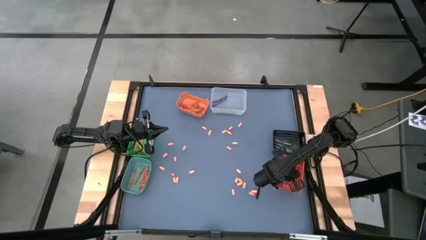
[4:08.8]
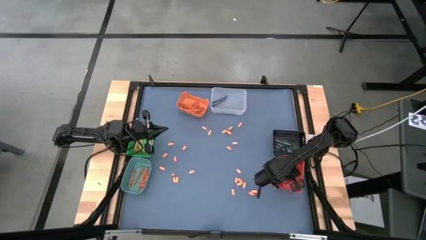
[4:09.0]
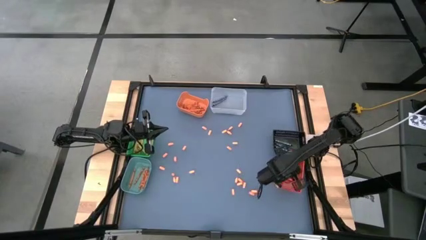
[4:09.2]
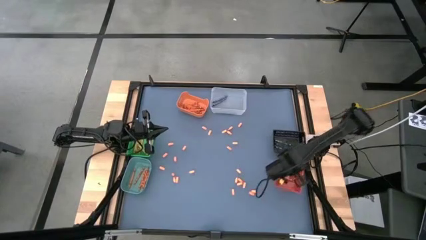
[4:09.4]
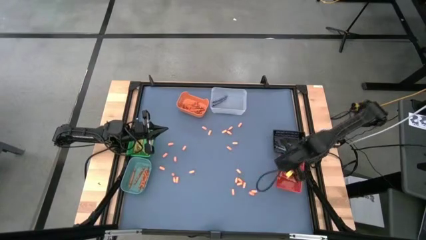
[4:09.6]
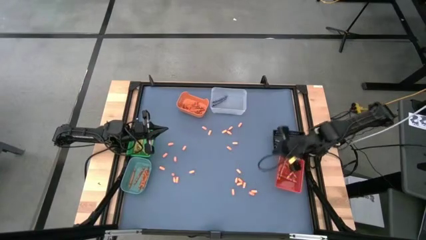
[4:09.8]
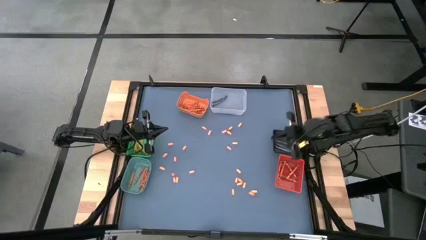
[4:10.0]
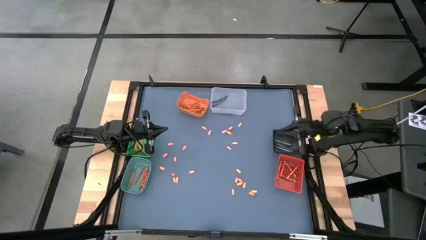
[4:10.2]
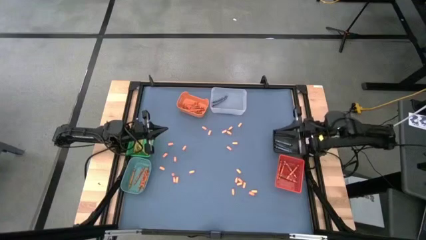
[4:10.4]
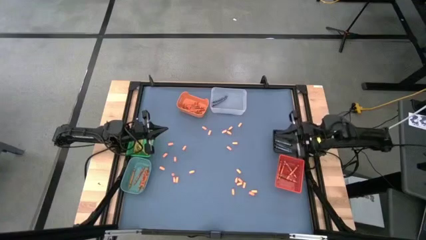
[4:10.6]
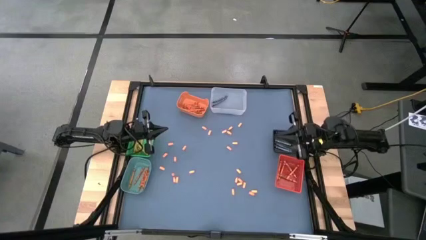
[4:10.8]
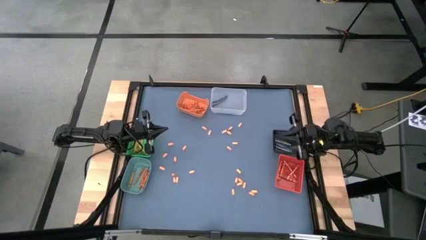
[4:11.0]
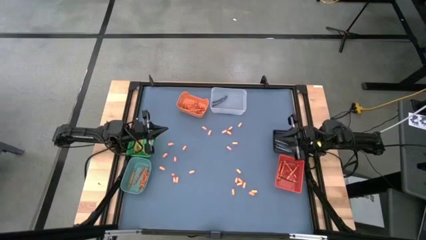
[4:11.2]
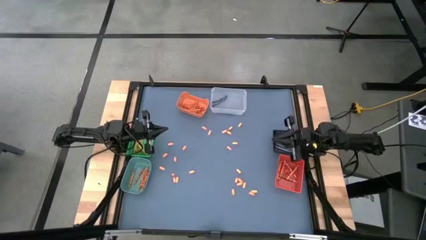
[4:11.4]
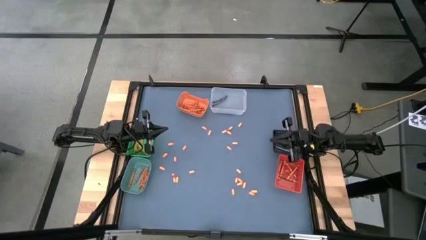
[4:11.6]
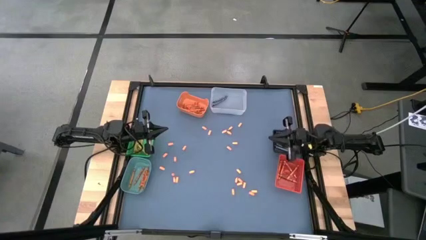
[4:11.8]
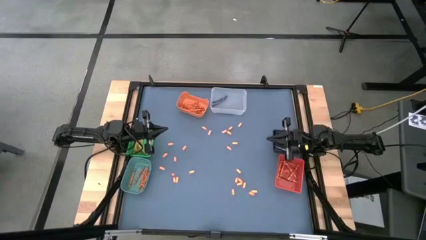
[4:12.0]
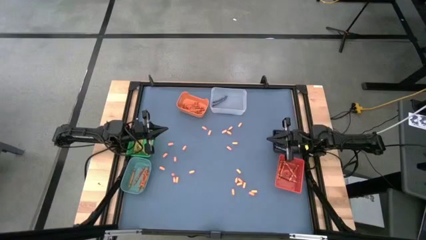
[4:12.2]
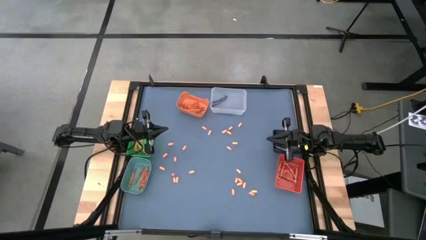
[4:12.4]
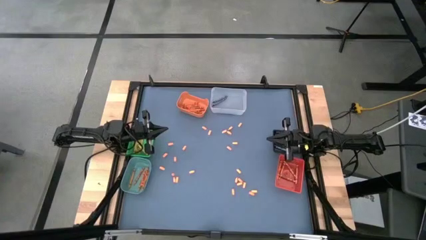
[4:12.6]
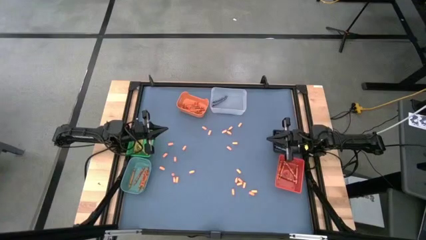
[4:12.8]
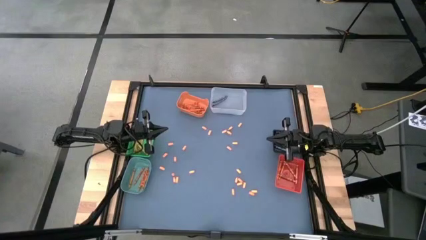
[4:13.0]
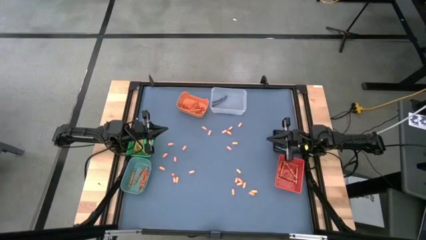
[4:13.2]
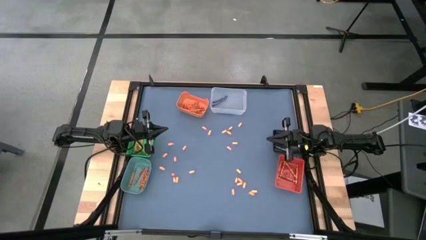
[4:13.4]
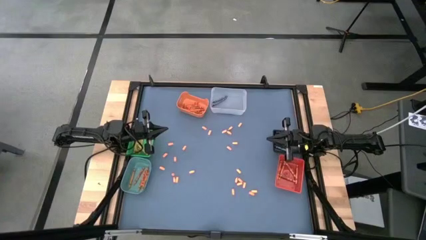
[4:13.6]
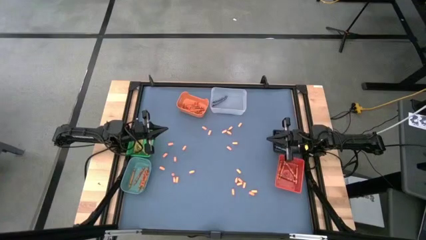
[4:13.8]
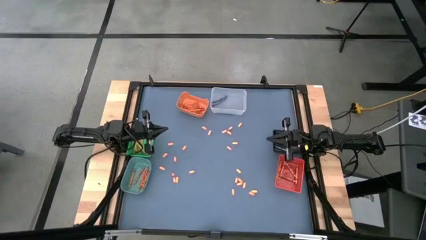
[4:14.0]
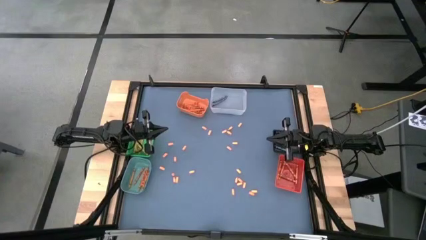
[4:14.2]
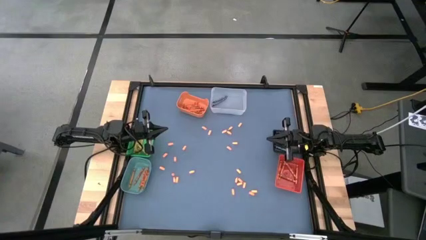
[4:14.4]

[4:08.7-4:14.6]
Task: Sort crayons
Return to home position

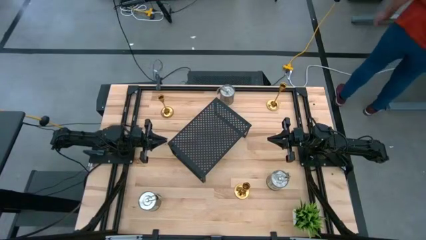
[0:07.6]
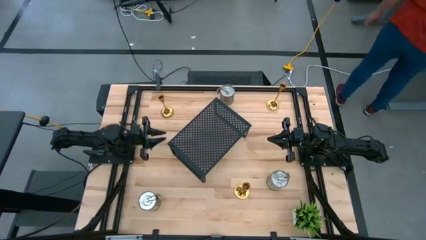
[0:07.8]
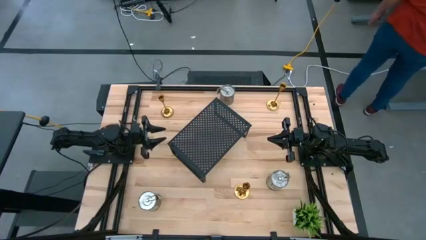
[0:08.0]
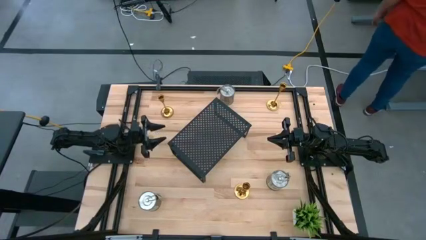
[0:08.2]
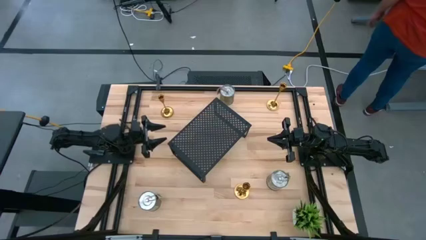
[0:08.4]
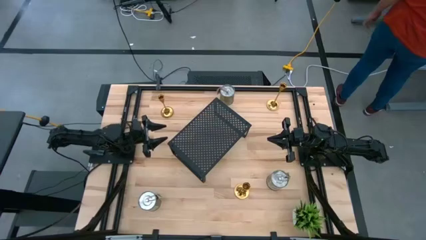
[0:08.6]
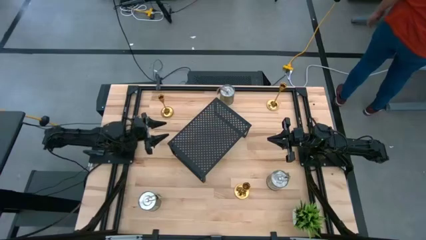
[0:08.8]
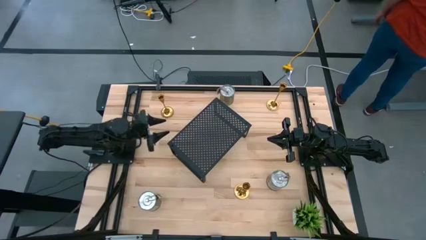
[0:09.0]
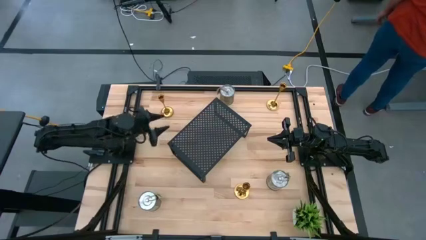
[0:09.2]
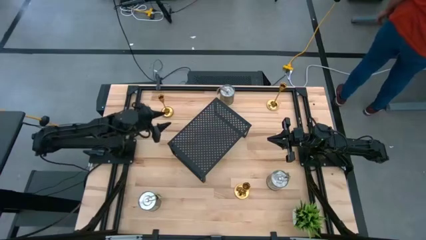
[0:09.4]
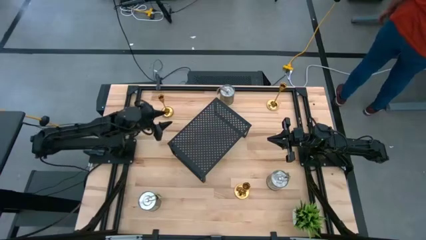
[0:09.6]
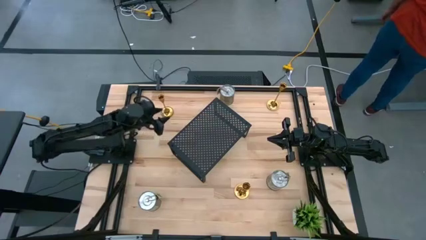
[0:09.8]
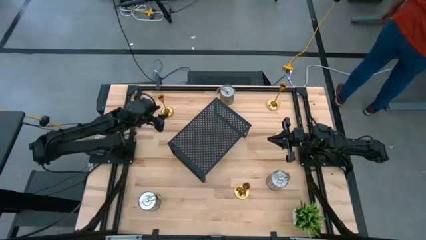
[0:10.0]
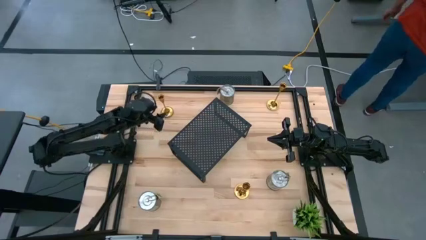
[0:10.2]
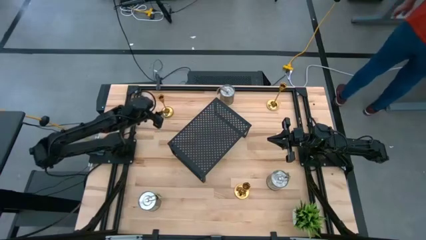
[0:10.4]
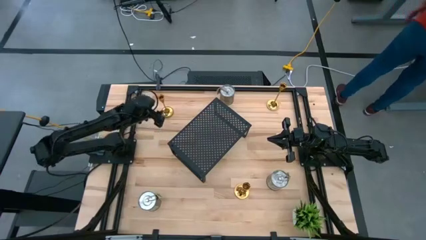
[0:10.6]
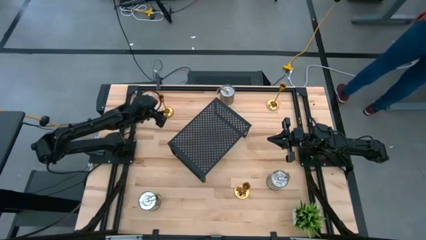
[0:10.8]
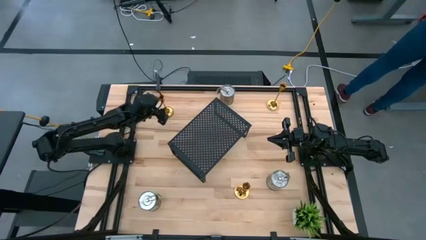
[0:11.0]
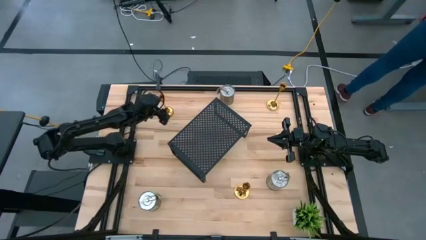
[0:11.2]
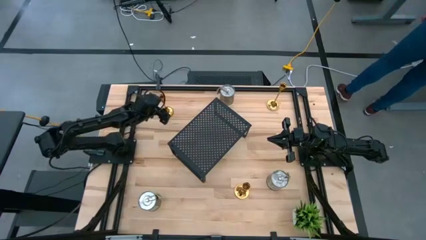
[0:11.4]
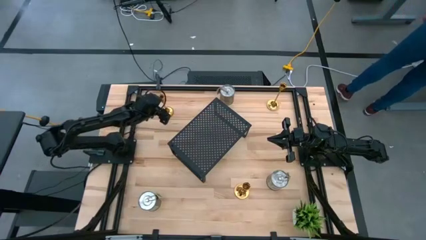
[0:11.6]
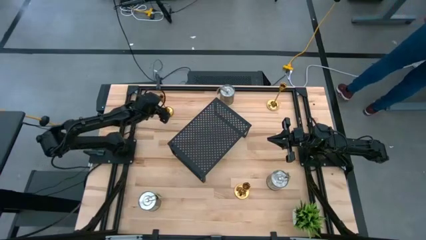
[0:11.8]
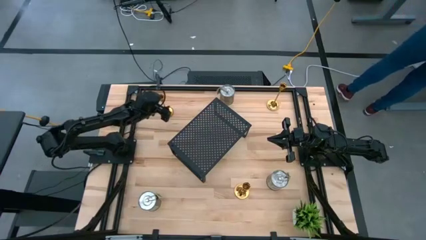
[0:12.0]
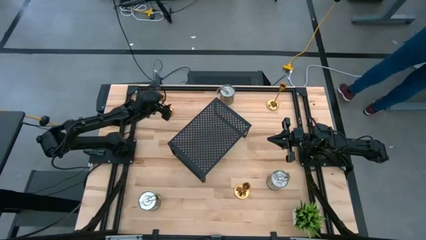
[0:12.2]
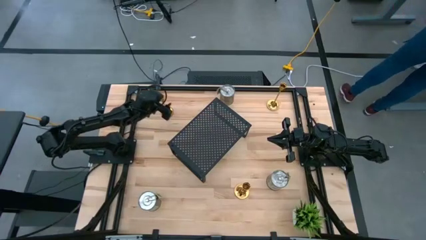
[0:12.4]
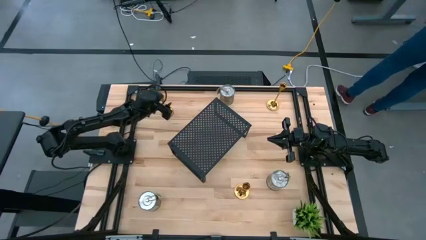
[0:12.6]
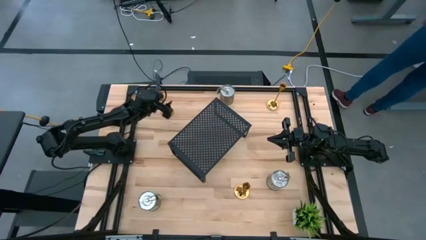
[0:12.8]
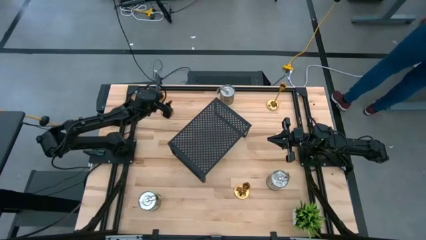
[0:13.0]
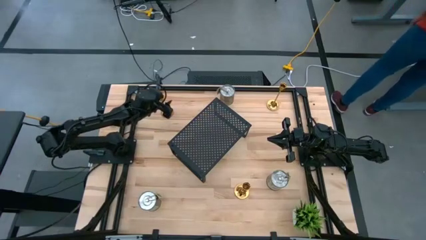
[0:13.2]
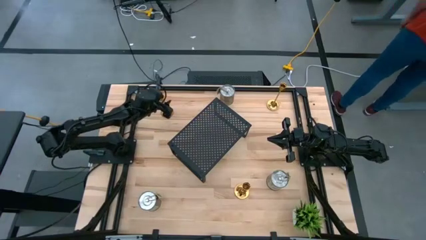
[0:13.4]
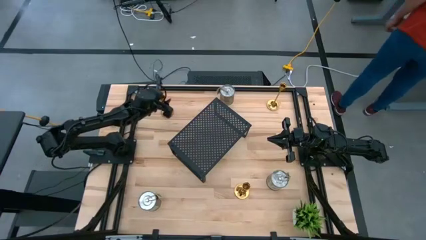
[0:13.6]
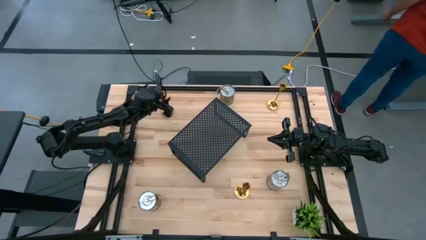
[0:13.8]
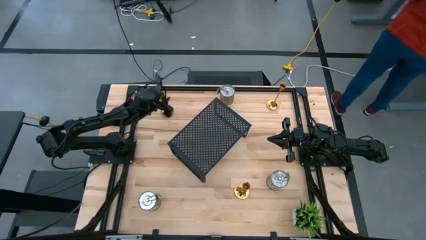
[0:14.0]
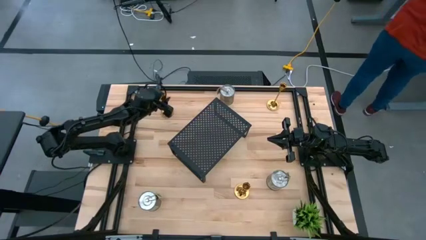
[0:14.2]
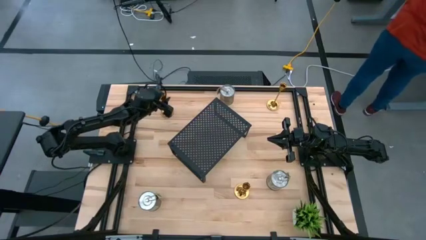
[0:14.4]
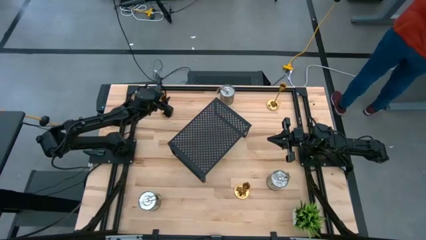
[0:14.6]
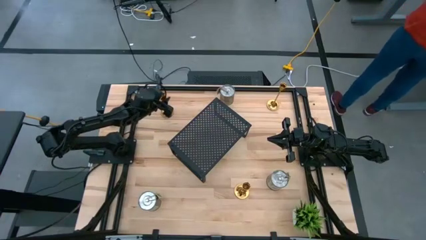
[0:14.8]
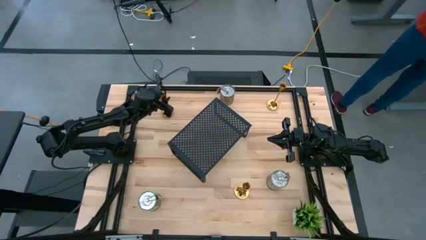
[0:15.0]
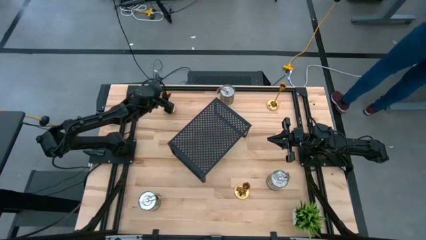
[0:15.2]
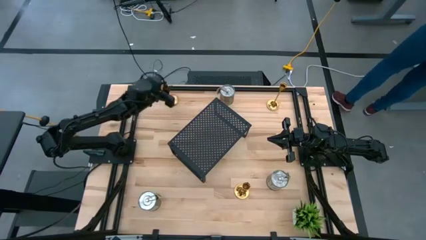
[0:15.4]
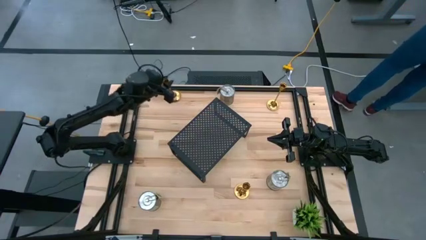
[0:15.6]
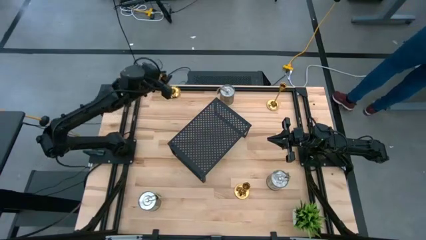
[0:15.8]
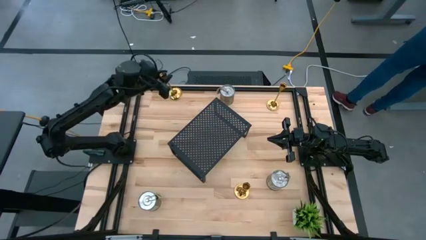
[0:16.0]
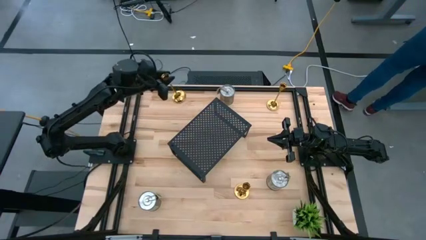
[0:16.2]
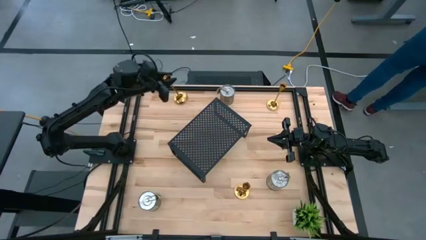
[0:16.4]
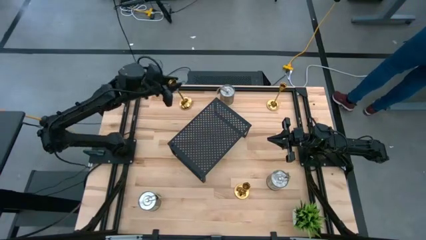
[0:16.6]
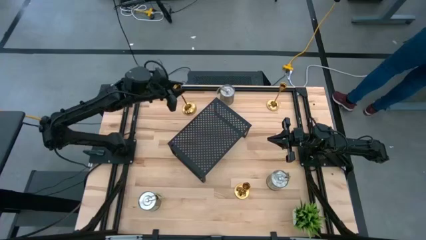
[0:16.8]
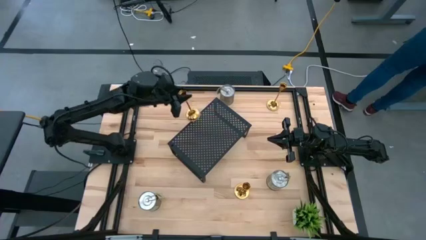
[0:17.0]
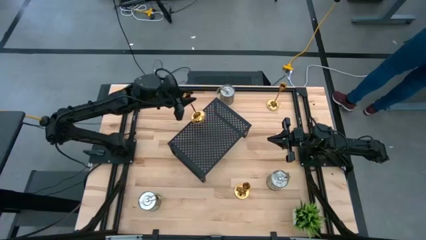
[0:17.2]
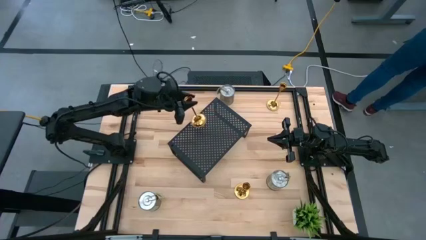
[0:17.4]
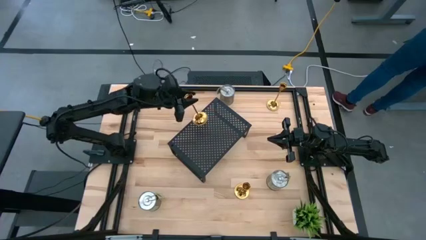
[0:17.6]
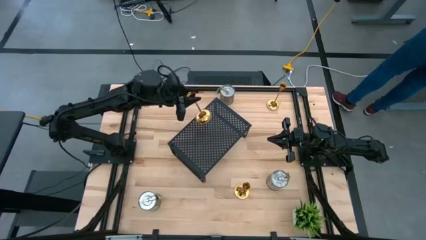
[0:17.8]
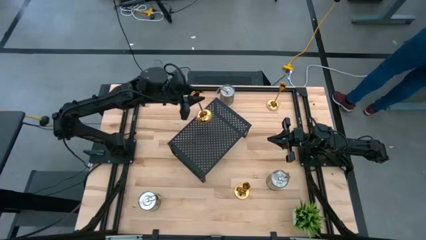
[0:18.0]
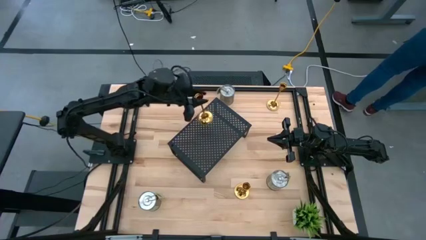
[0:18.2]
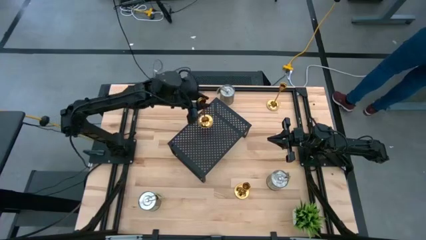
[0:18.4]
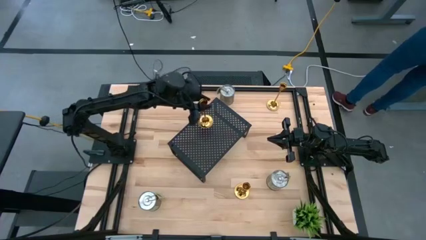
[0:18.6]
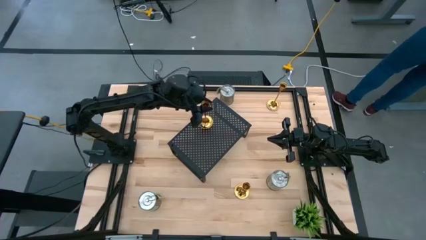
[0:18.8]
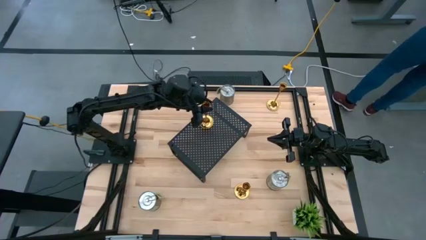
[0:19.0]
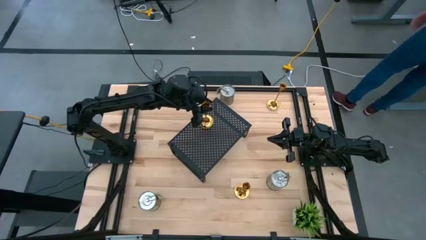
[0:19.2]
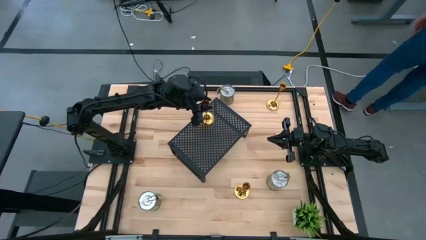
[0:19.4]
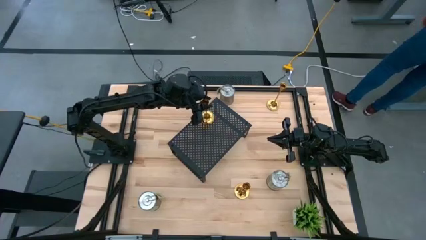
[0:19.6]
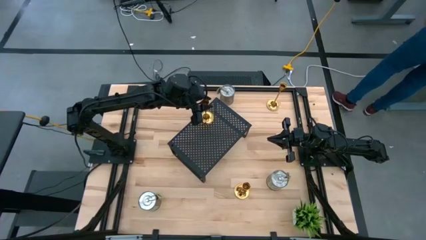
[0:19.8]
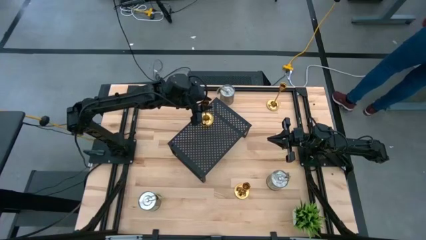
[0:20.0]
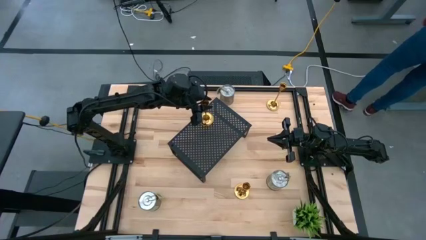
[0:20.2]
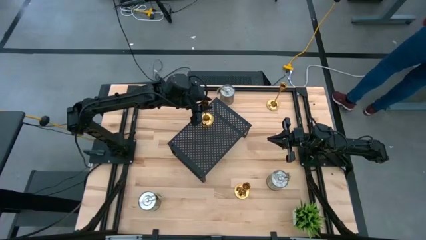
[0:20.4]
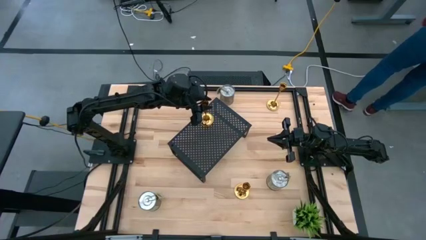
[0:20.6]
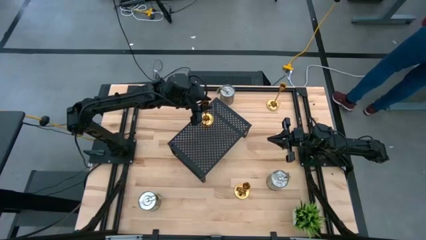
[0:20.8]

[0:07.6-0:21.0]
Task: Pick & Place candle stick holders
Put the top left gold candle holder on the shelf
